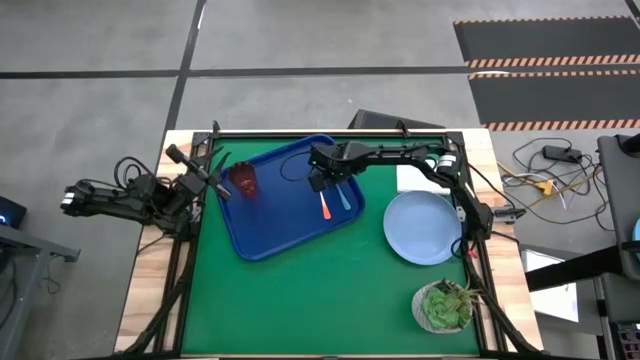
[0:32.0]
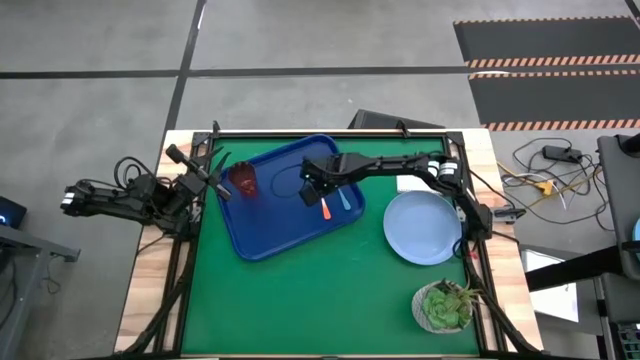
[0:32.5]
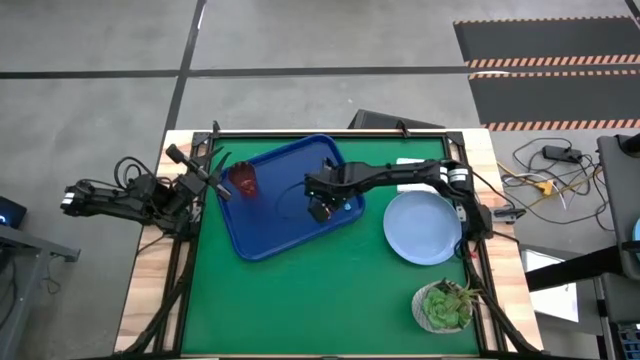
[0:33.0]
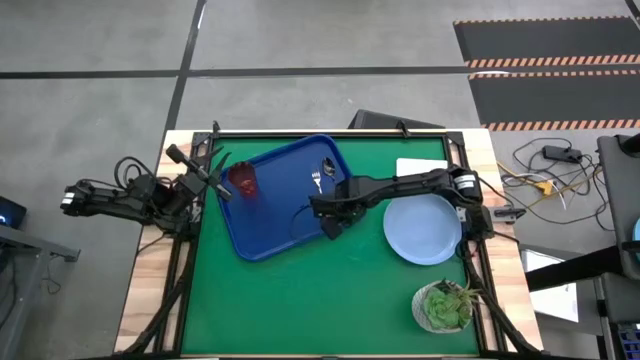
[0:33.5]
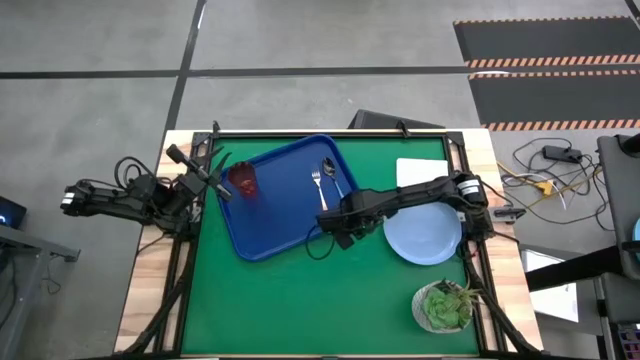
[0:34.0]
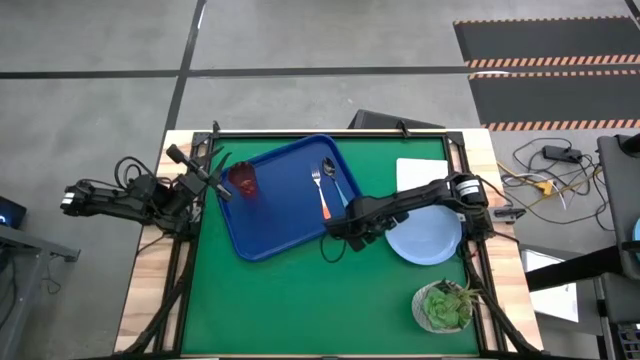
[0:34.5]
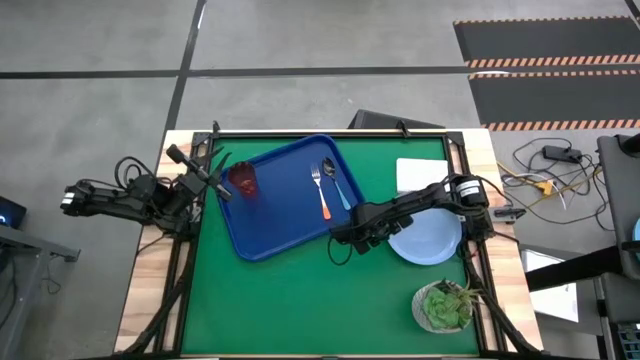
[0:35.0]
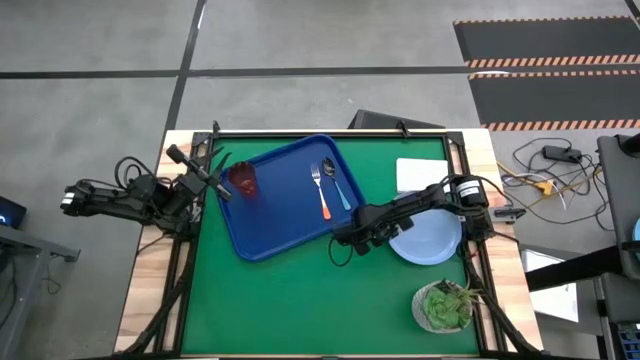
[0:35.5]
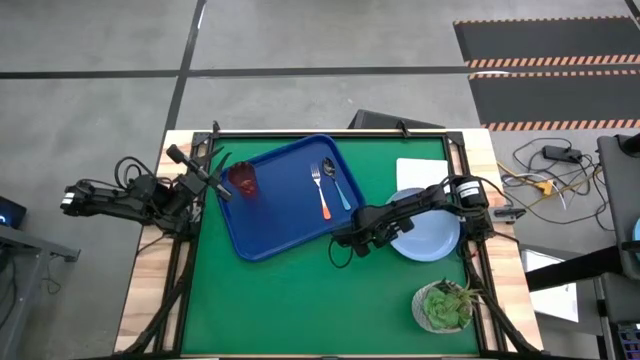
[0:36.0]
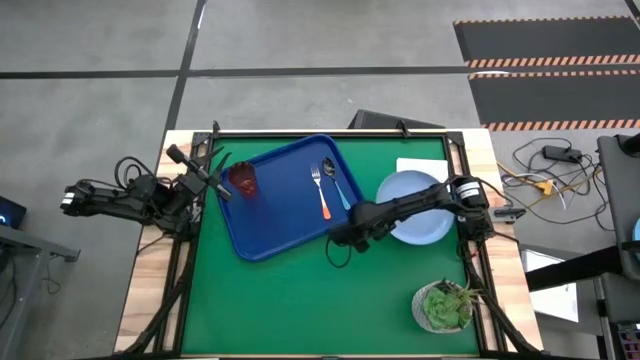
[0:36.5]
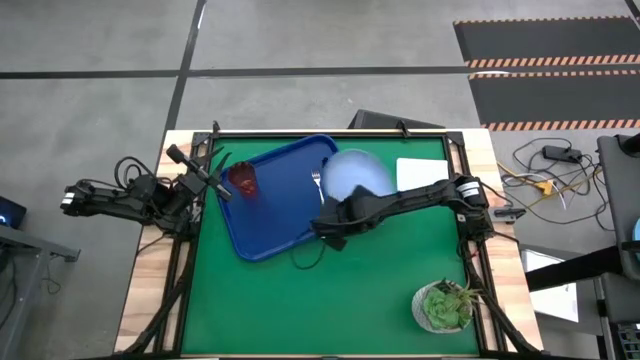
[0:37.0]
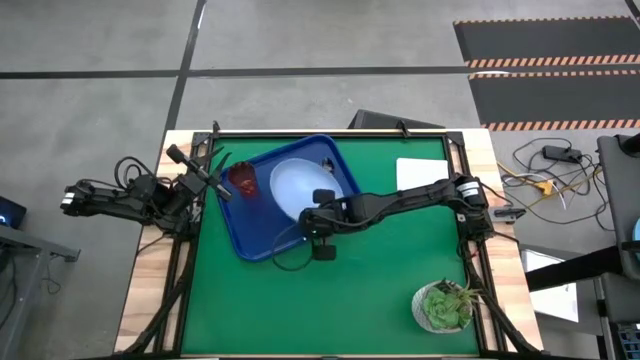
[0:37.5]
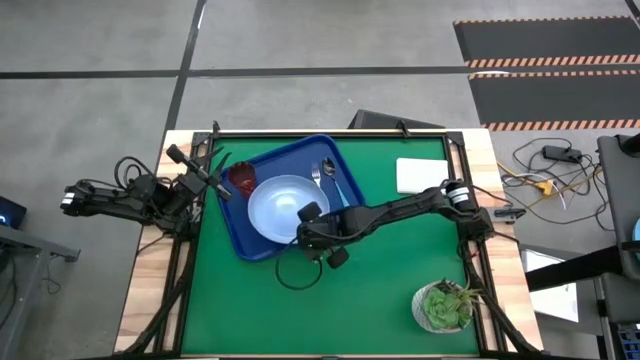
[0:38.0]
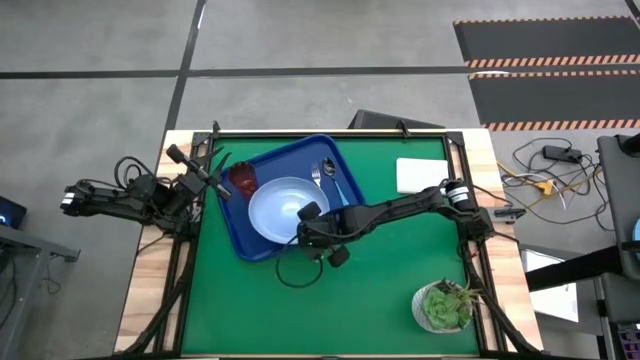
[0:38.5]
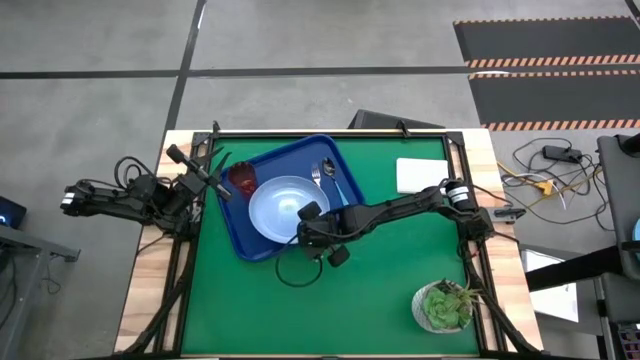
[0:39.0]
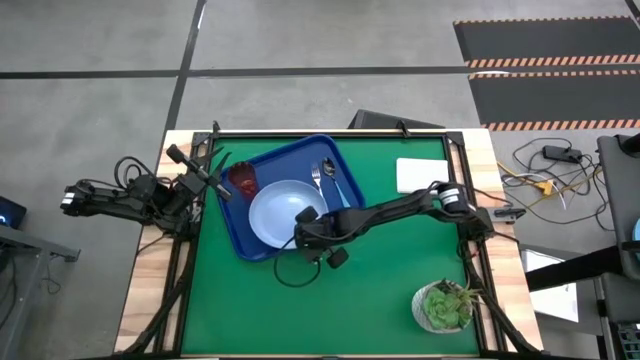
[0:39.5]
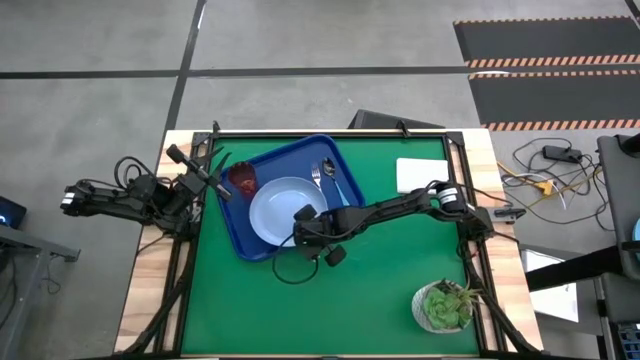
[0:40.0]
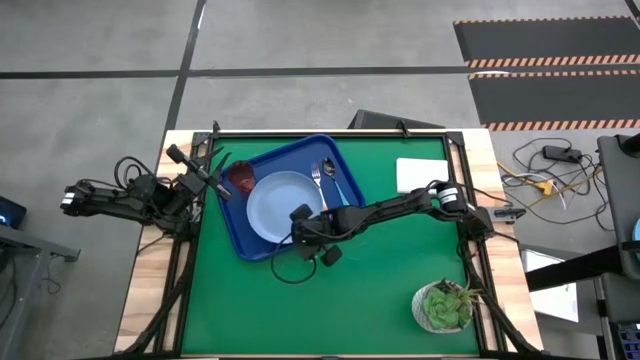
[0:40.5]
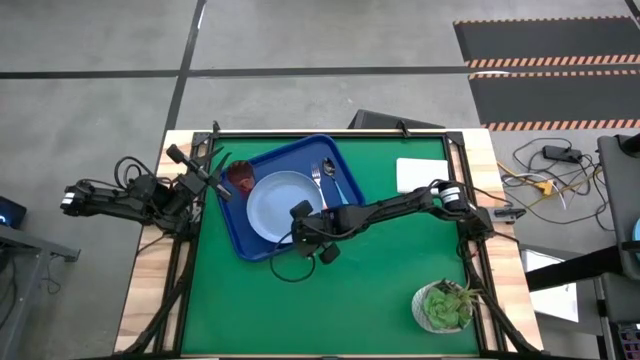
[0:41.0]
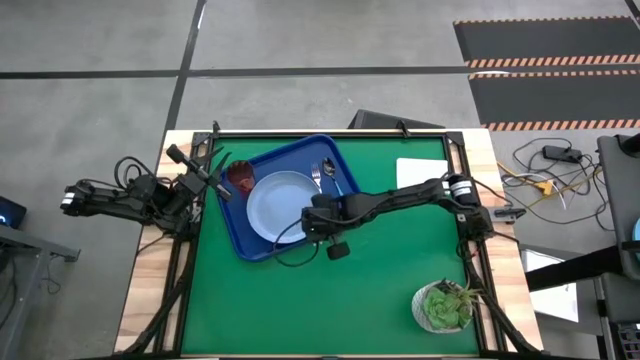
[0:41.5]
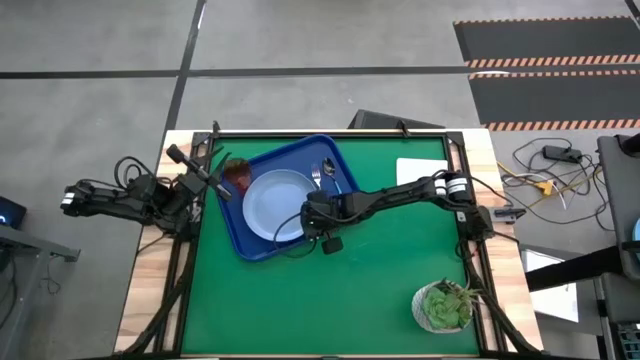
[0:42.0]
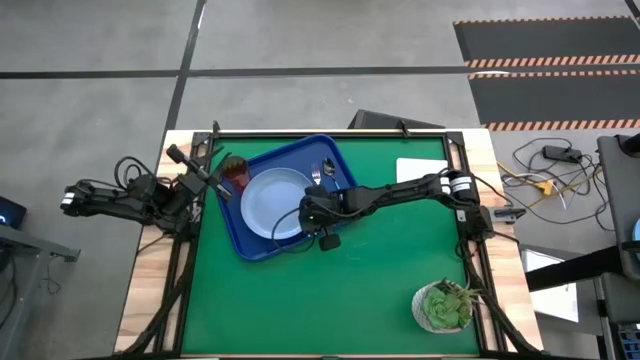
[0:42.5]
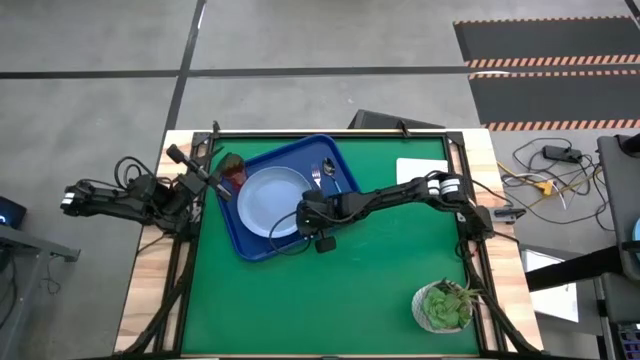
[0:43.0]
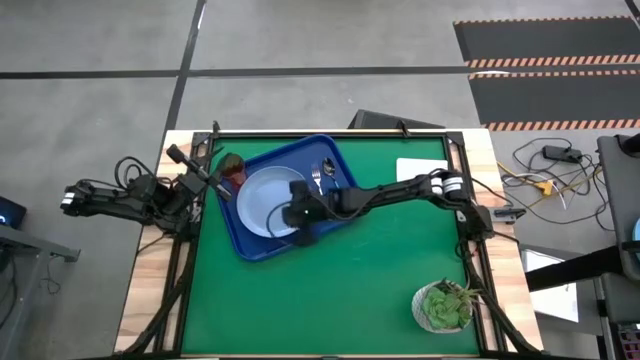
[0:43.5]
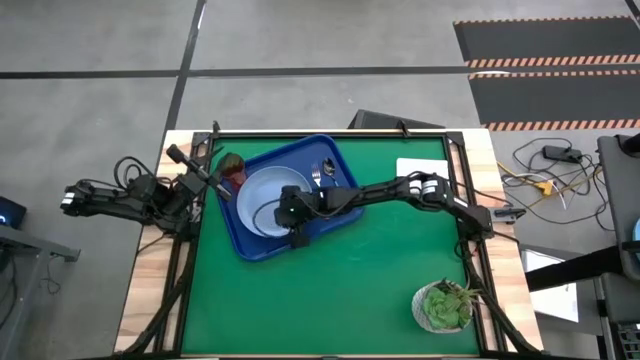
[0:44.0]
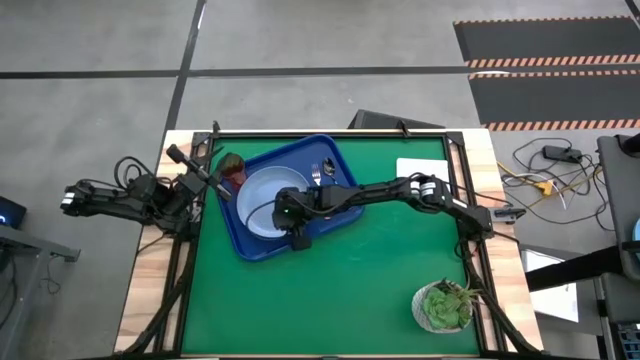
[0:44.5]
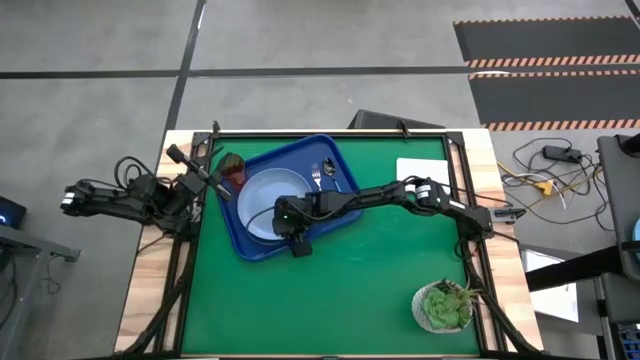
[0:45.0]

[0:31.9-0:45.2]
Task: Pick and place plate/cup/fork/spoon on tray
Put the light blue plate on the blue serving tray to the left of the orange fork

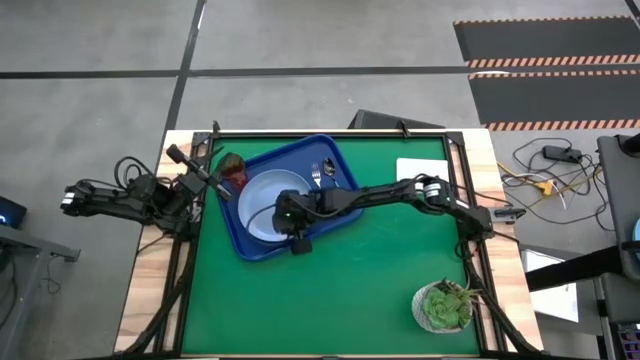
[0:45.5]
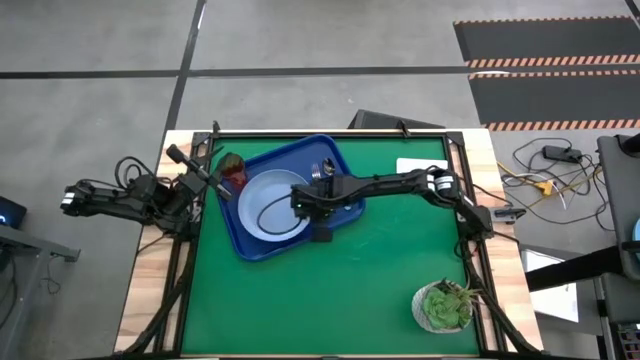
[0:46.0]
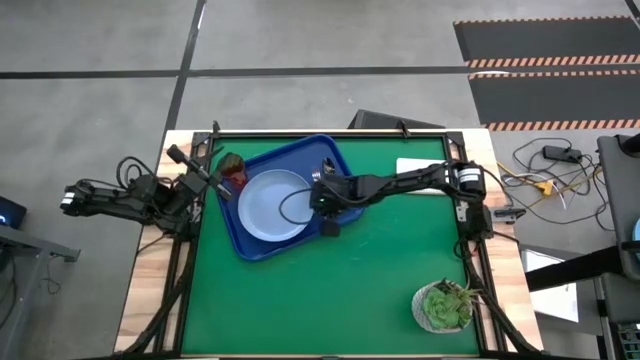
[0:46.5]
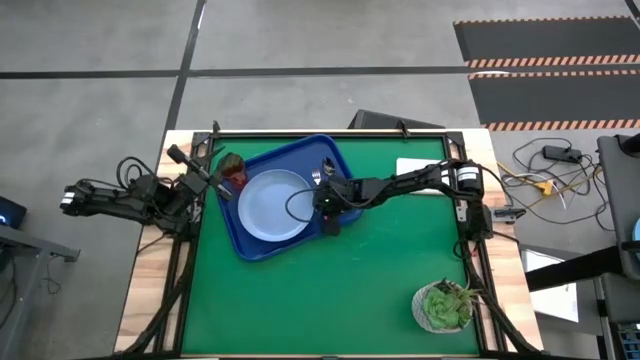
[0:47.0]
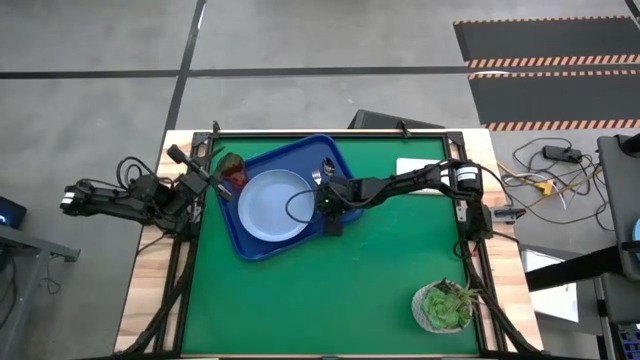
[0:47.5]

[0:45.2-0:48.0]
Adjust the orange fork on the blue serving tray

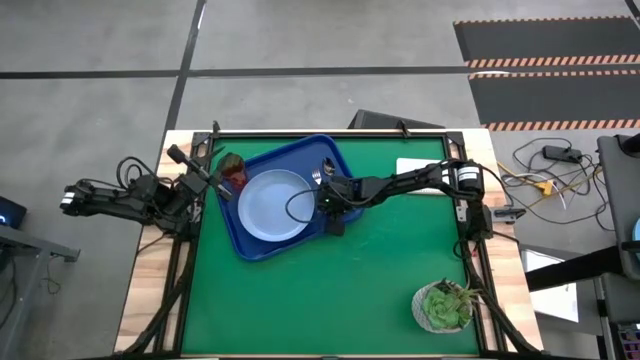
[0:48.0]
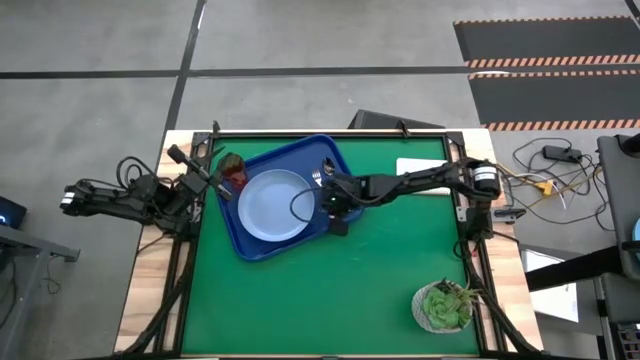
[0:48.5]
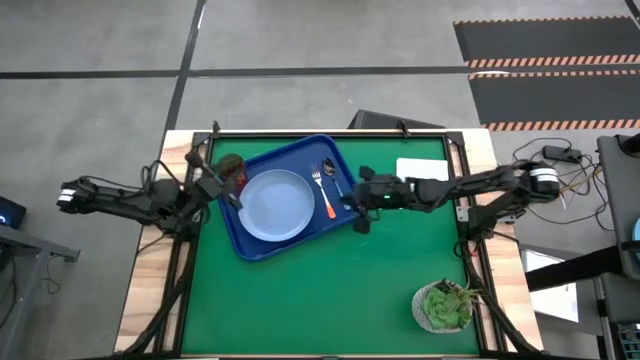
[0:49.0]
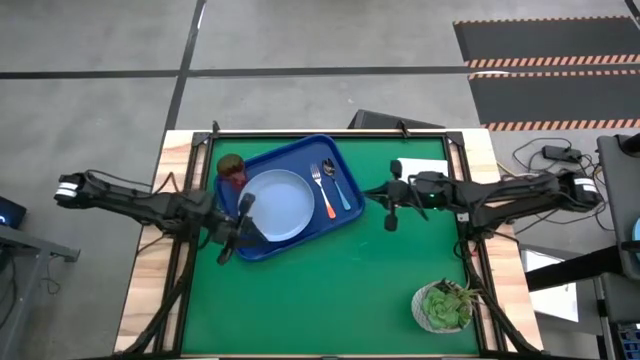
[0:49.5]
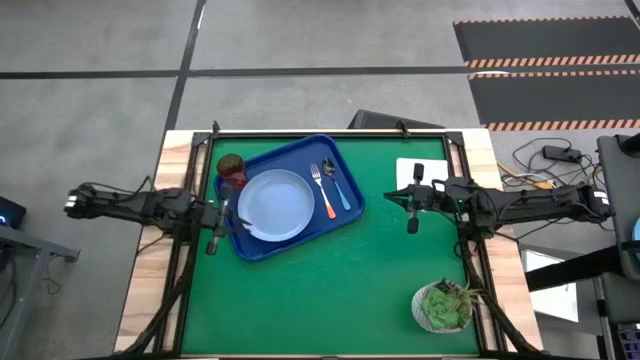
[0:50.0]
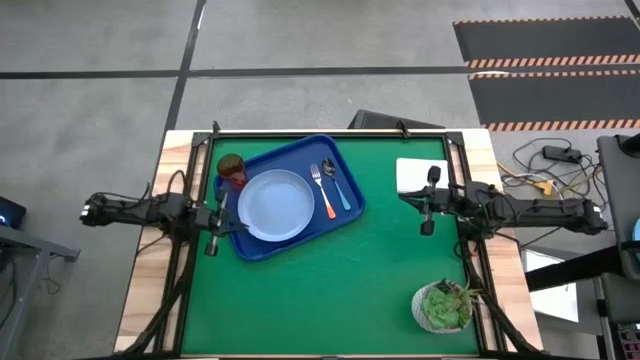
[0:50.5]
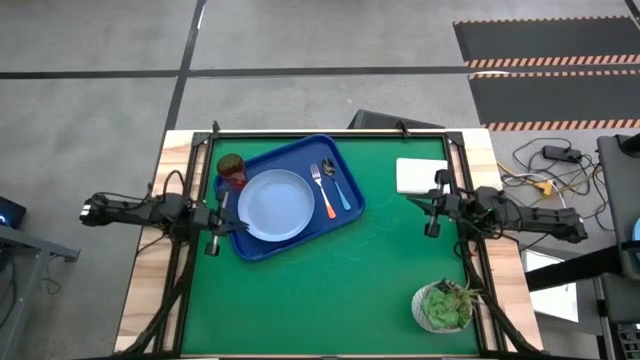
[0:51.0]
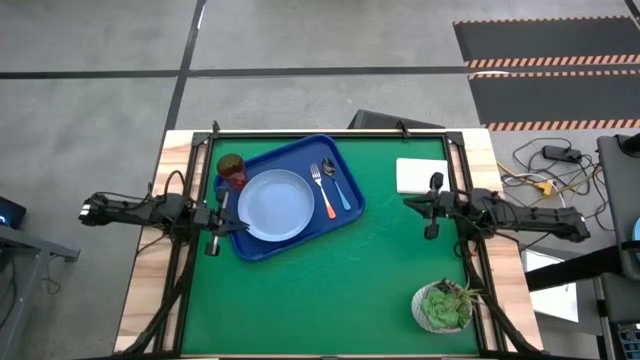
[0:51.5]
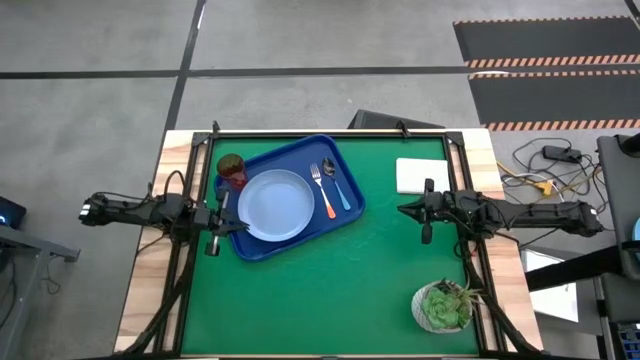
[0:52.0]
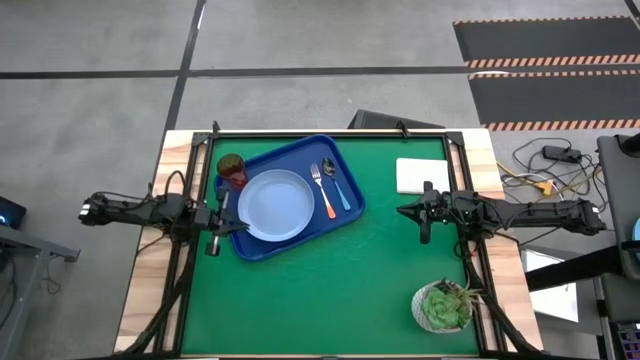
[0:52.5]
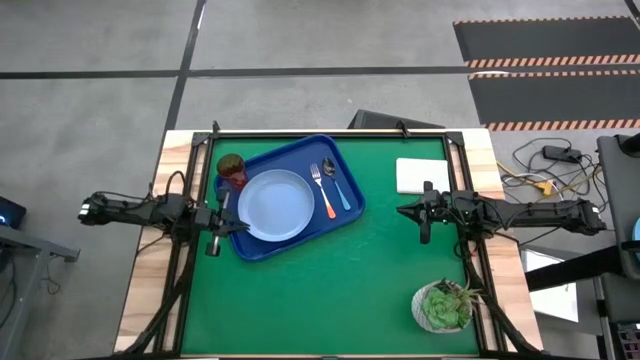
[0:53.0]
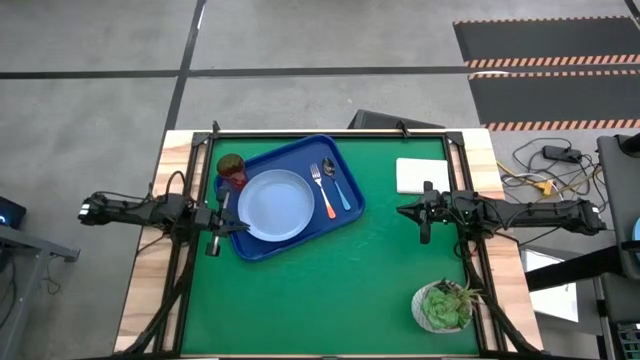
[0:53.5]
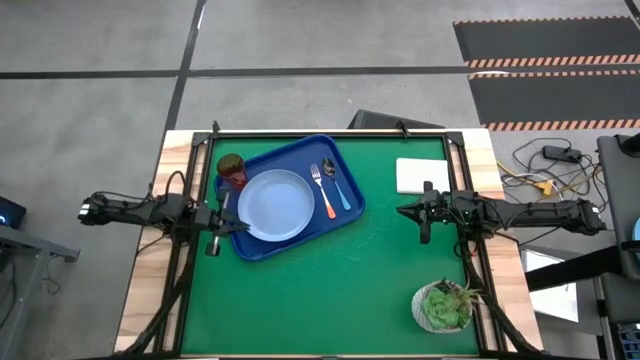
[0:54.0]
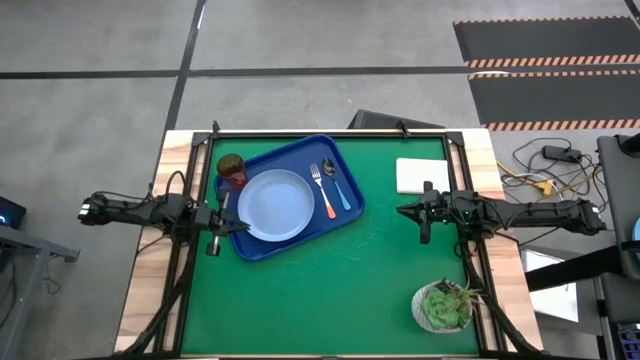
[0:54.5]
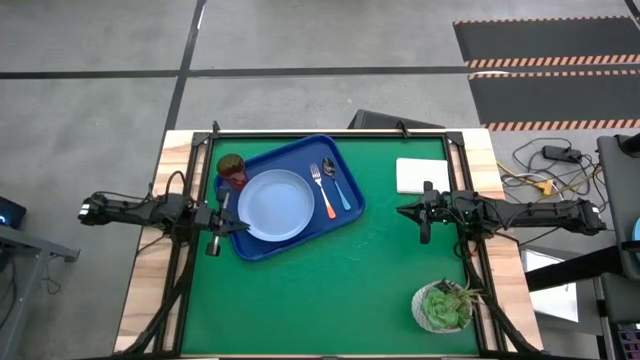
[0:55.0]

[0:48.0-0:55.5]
Return to Home Position
